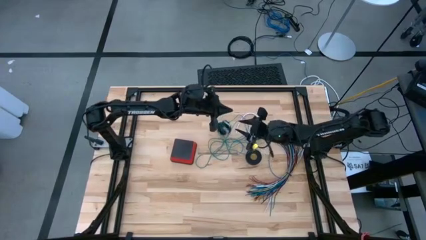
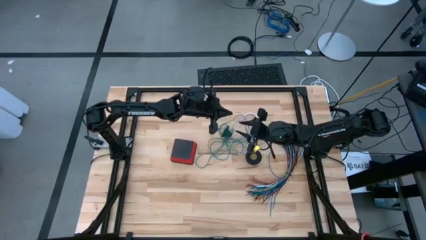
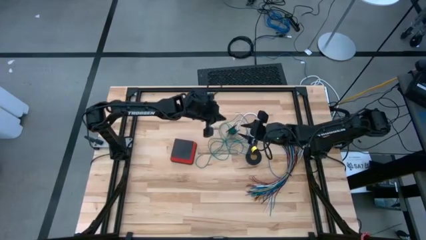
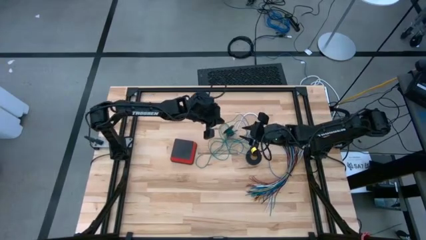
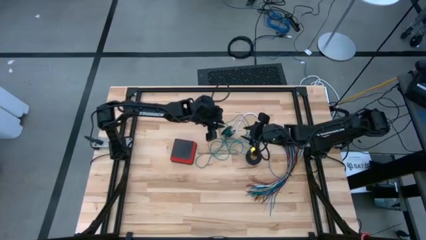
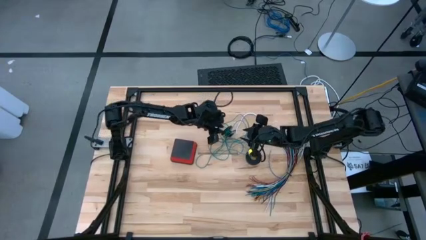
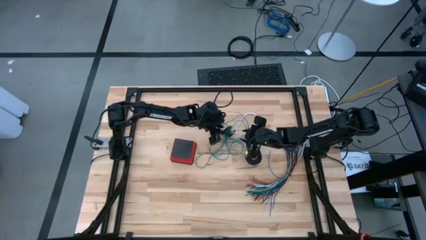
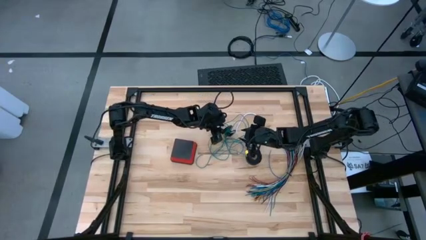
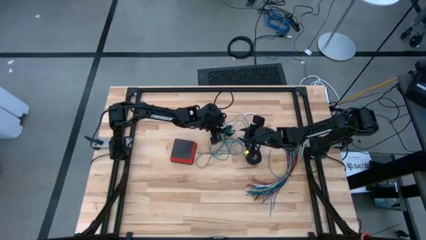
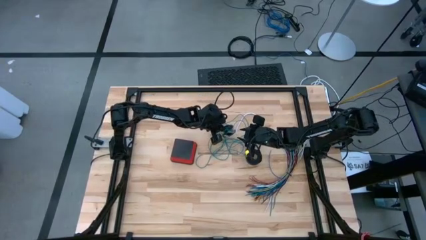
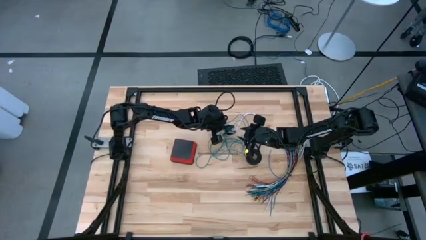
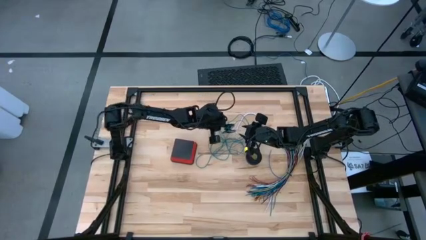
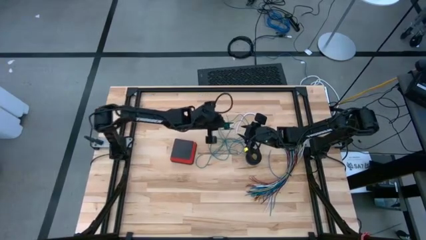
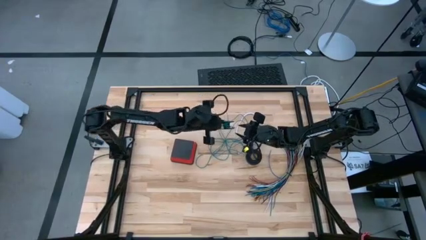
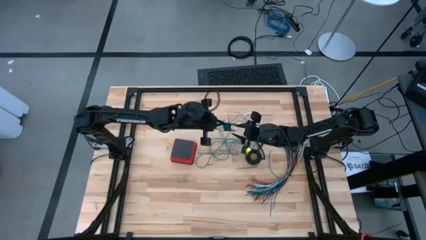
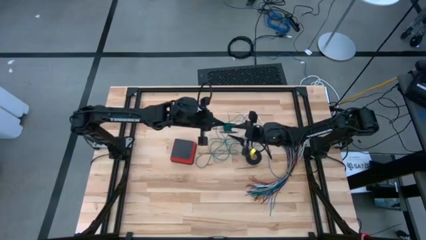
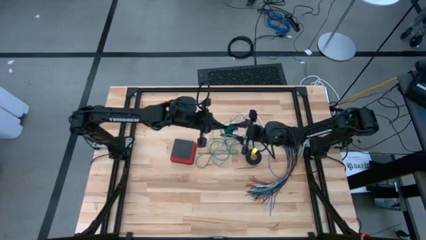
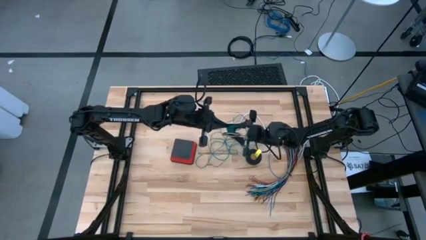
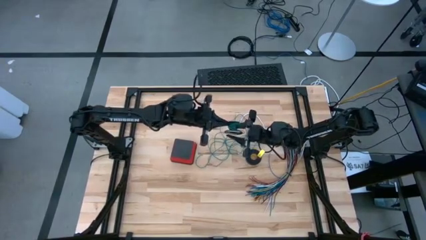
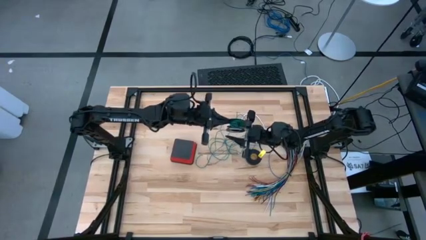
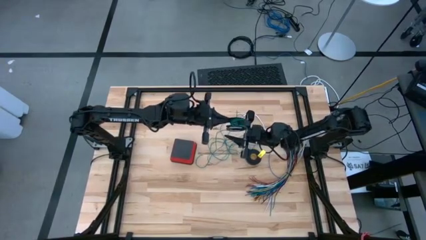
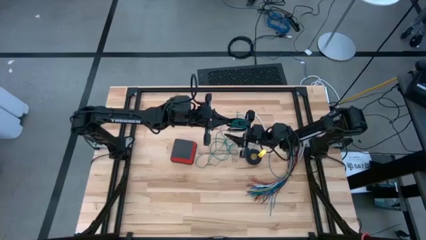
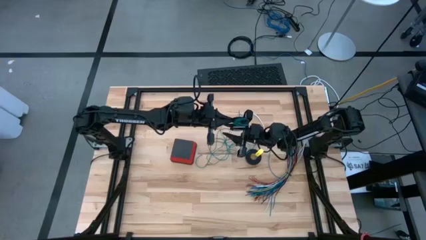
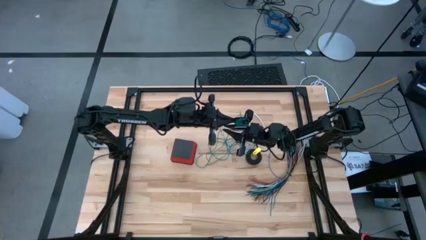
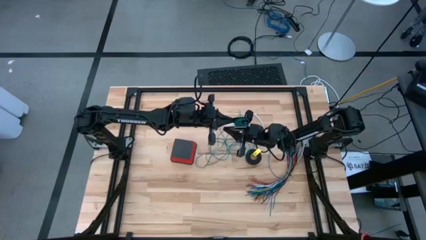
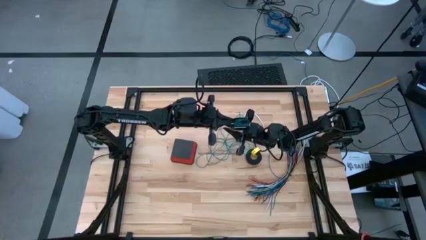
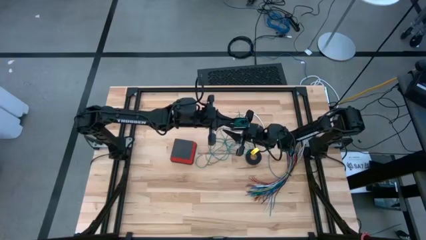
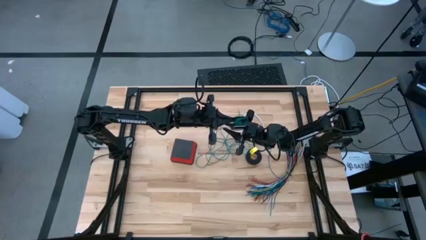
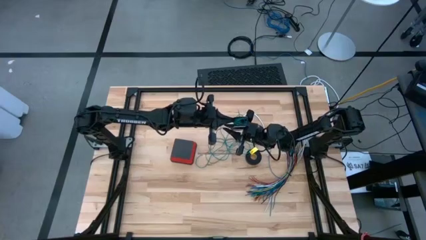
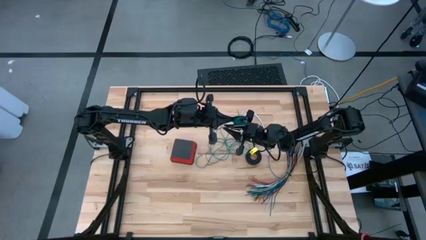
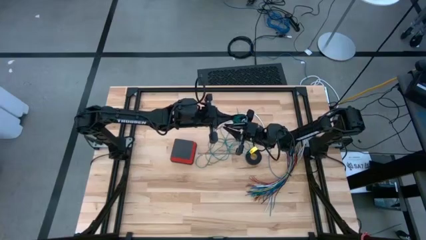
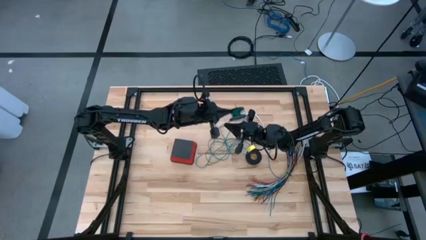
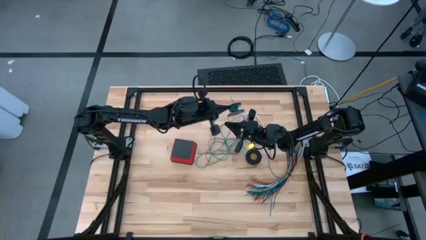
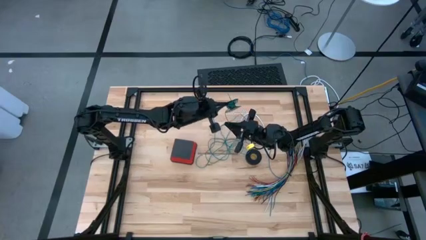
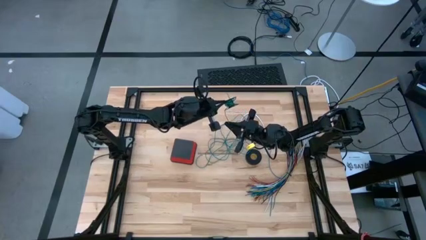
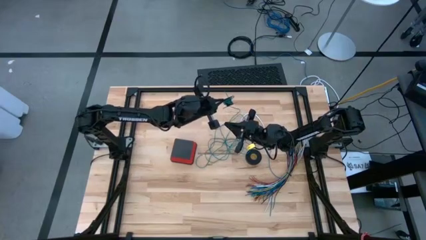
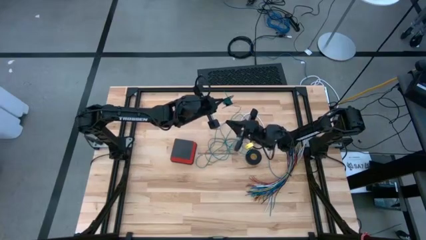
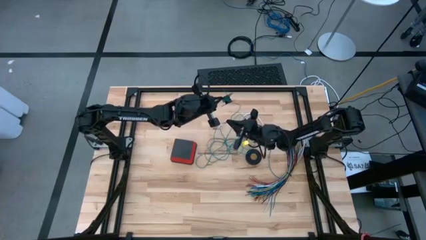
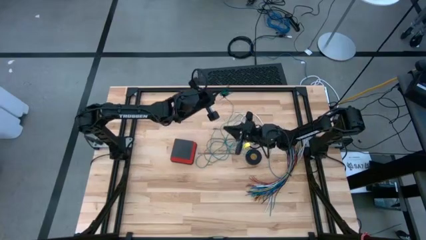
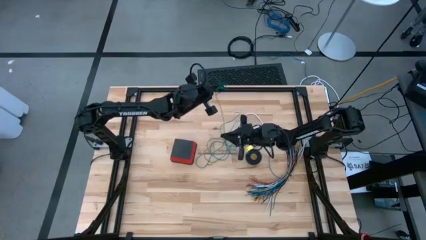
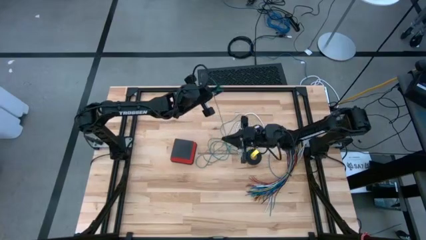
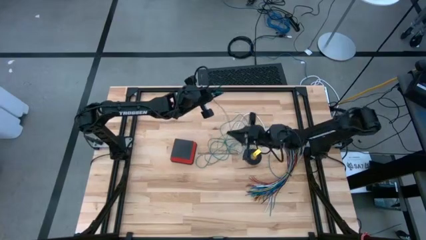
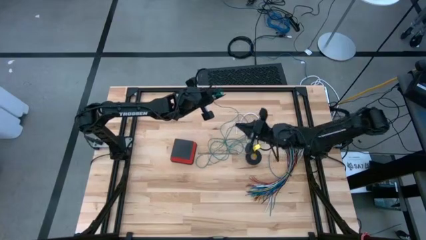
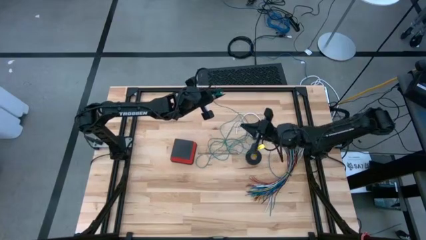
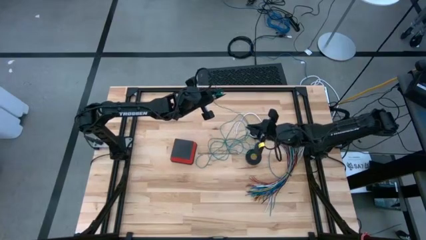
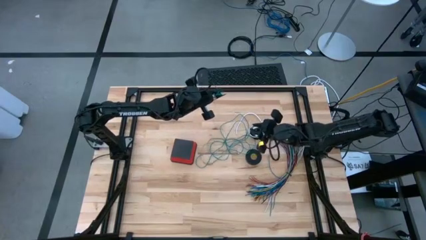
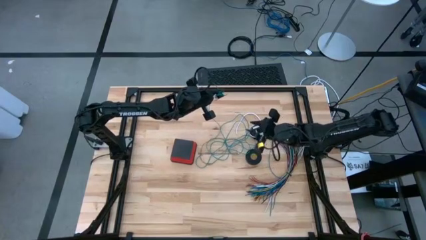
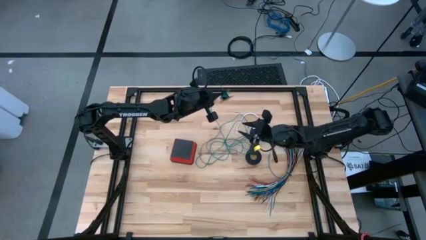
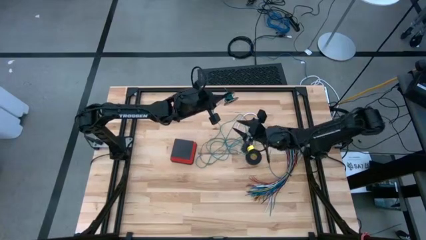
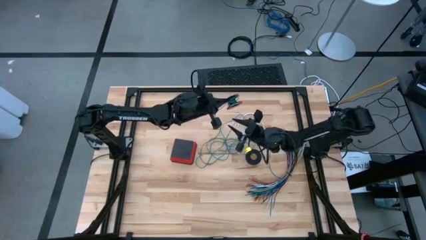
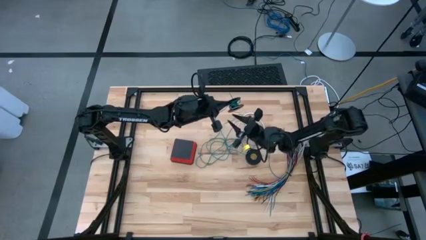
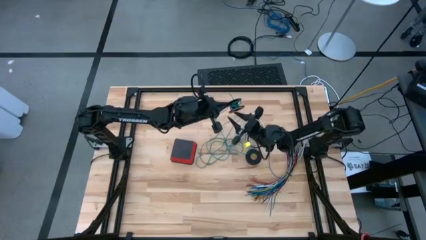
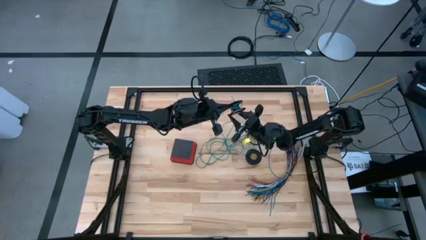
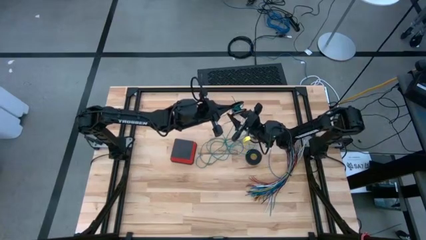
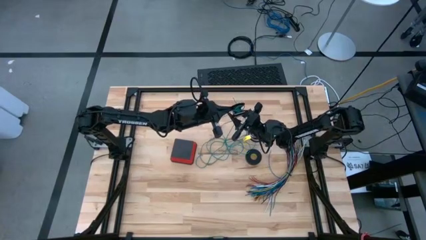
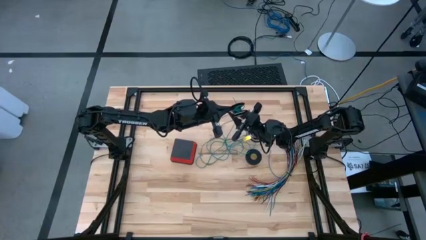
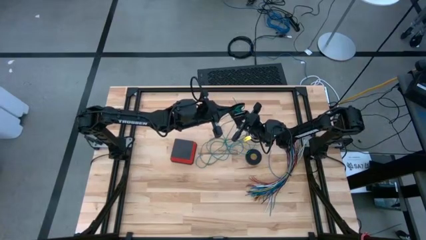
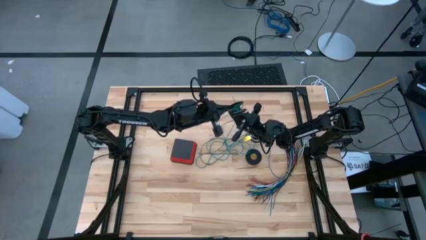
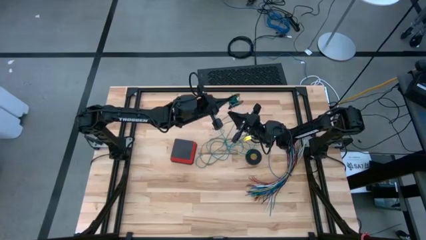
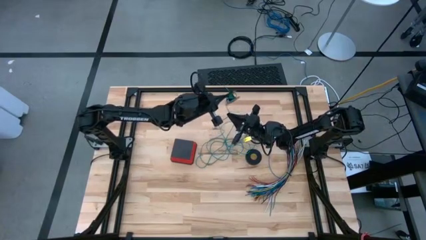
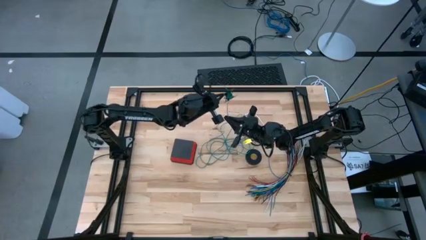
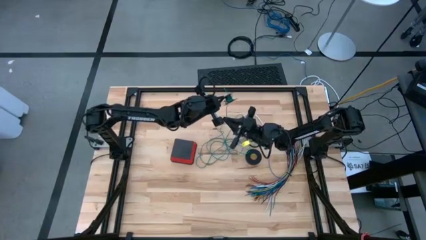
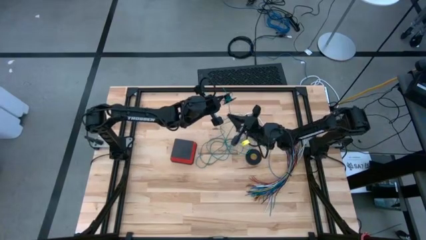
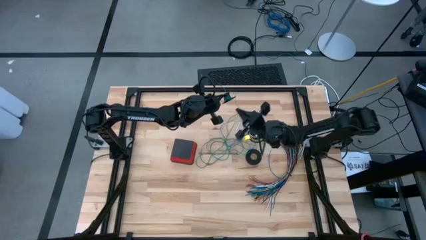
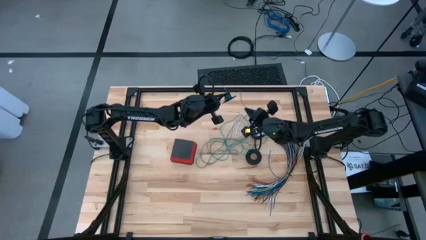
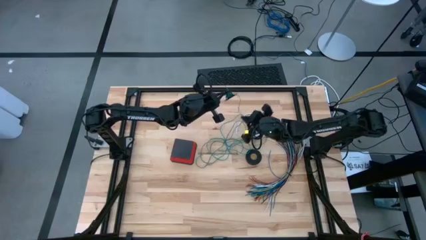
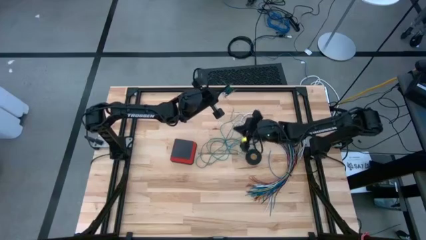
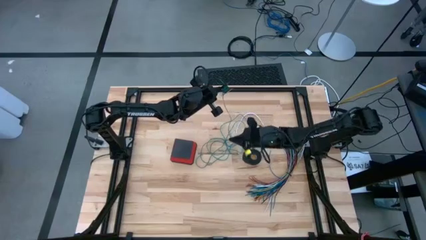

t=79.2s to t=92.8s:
Task: Coiling cords
Uncoil the green wire cable from the spool

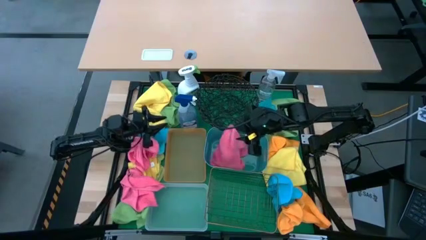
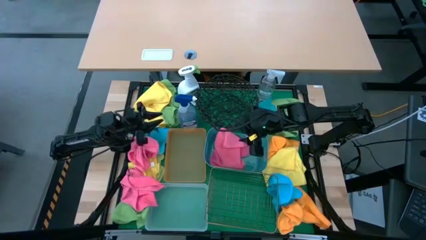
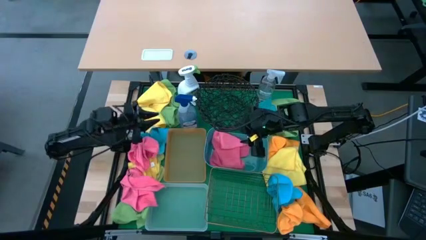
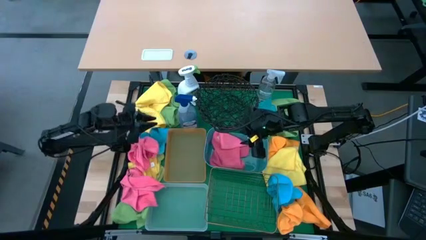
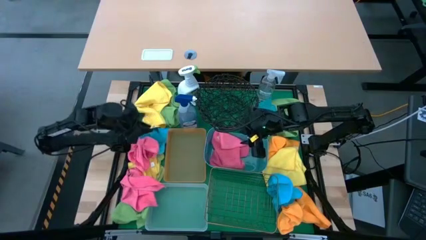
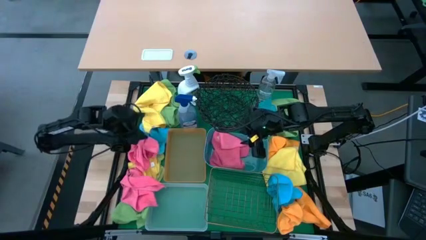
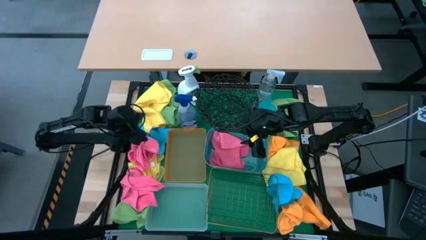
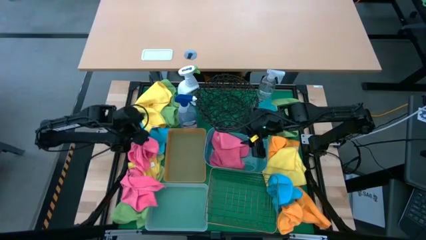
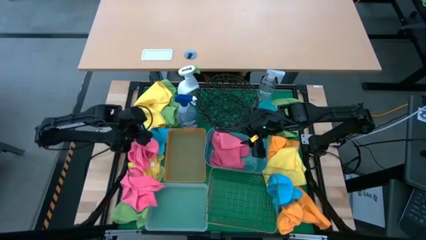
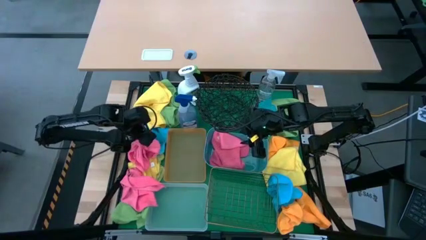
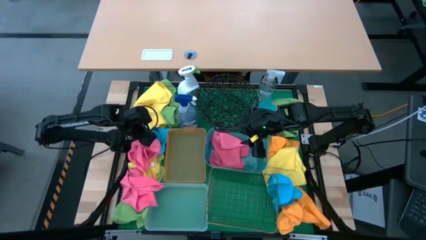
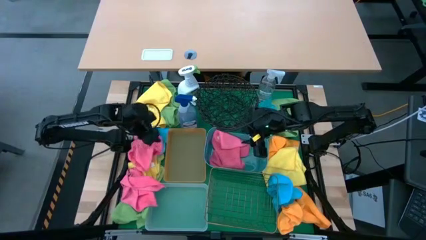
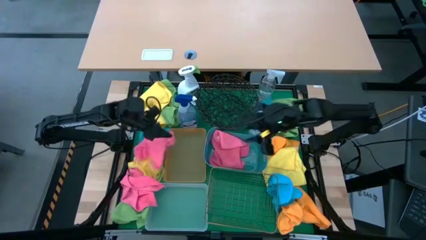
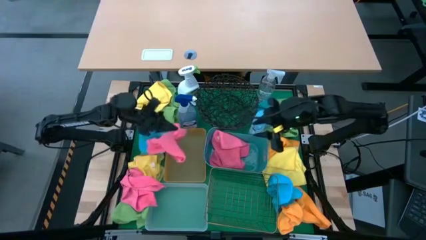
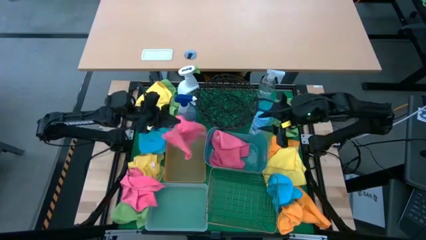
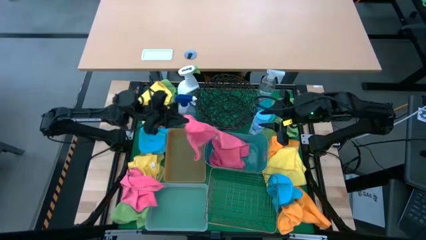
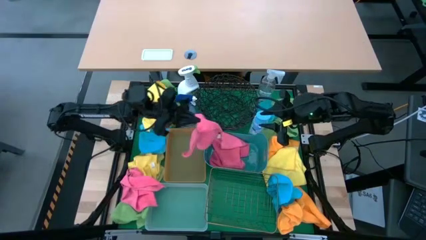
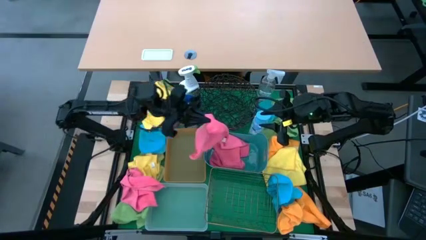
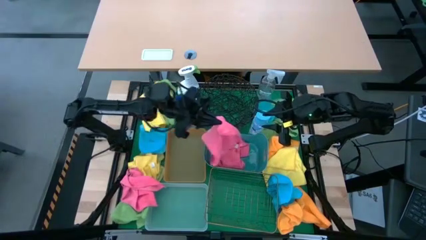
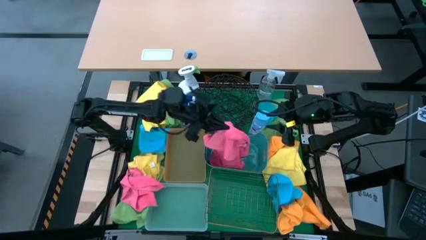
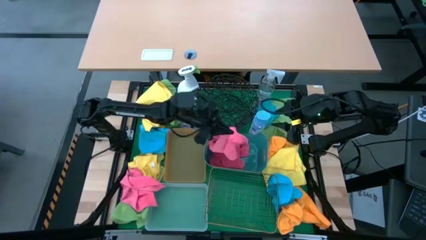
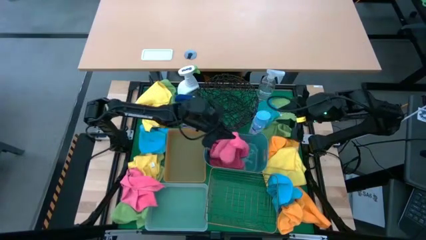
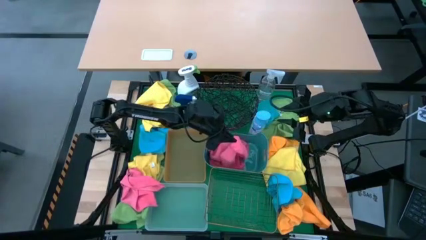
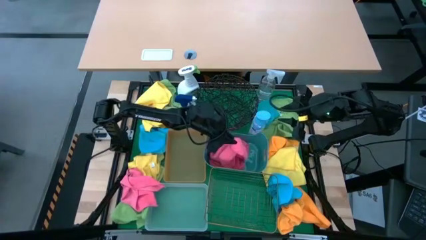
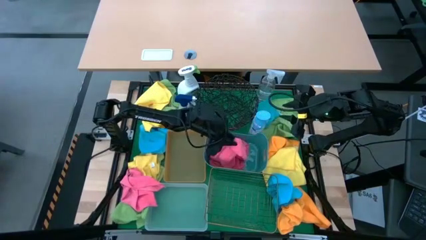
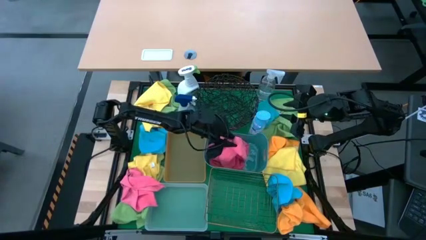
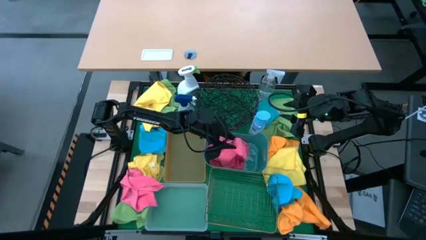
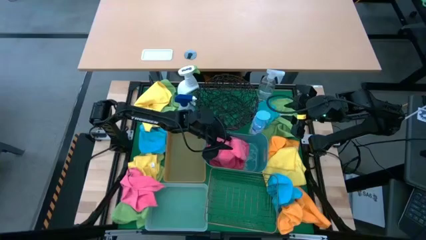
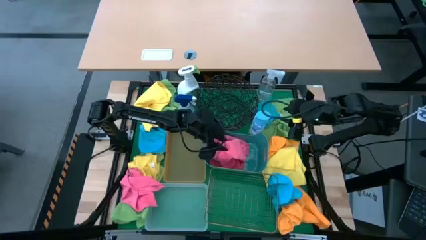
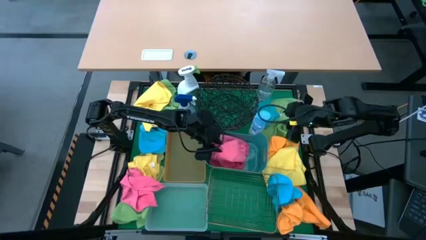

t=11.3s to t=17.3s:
Task: Sort microfiber towel by color & place in baskets
Put the top pink towel into the blue bin
